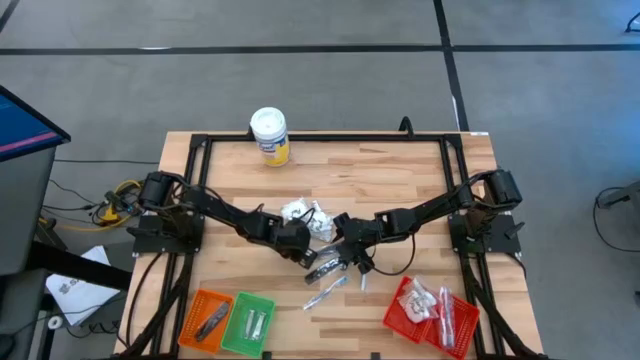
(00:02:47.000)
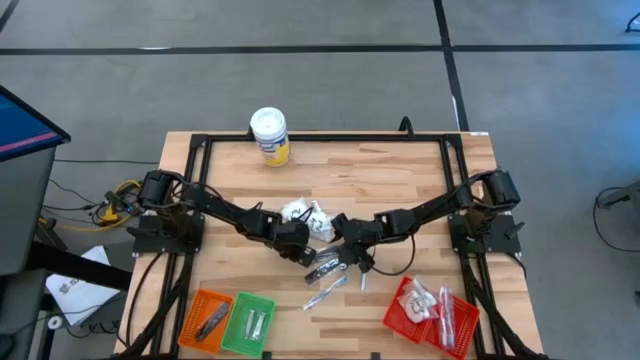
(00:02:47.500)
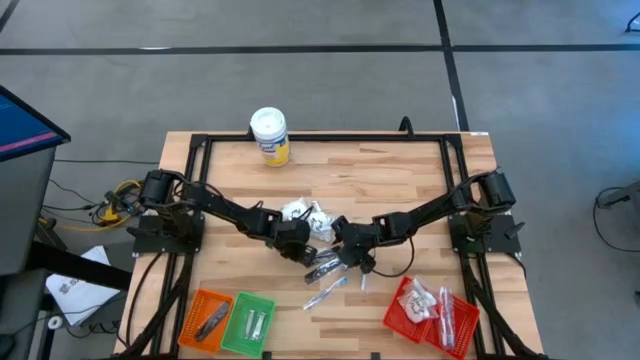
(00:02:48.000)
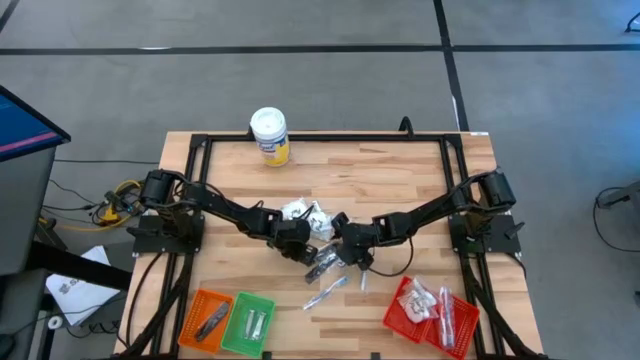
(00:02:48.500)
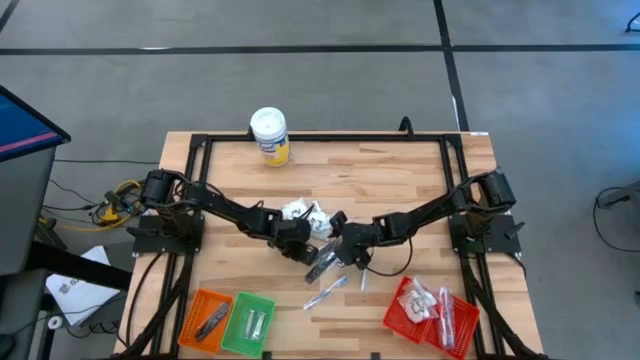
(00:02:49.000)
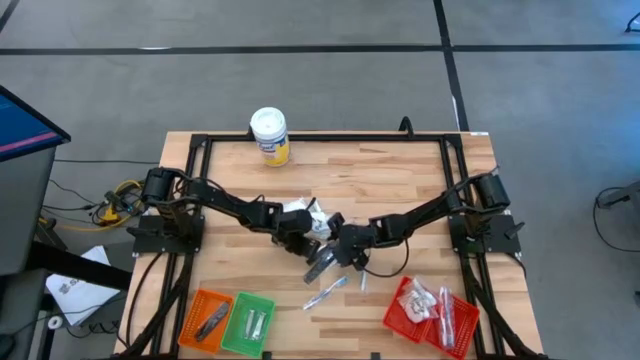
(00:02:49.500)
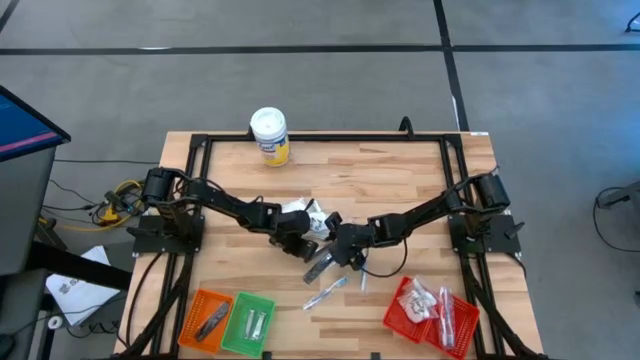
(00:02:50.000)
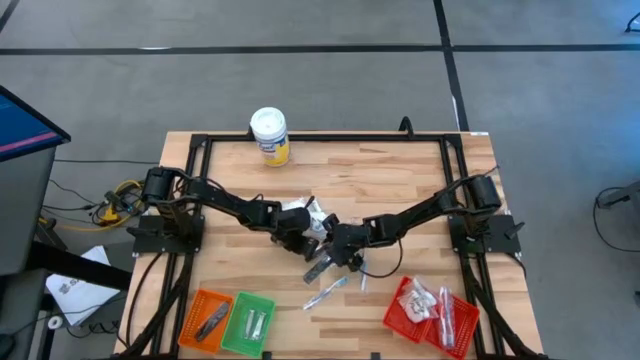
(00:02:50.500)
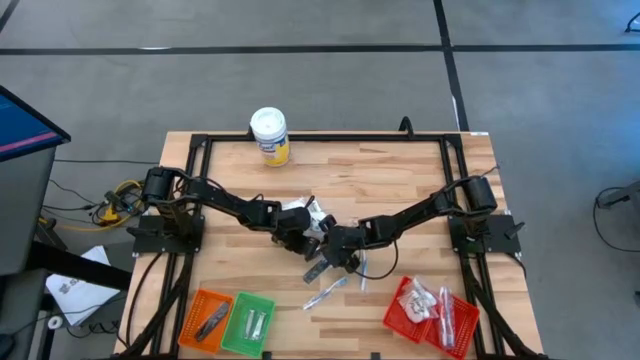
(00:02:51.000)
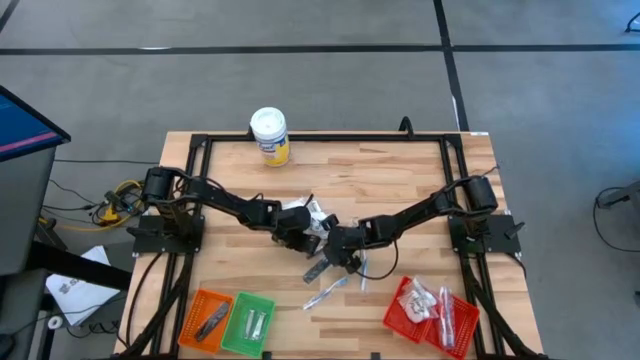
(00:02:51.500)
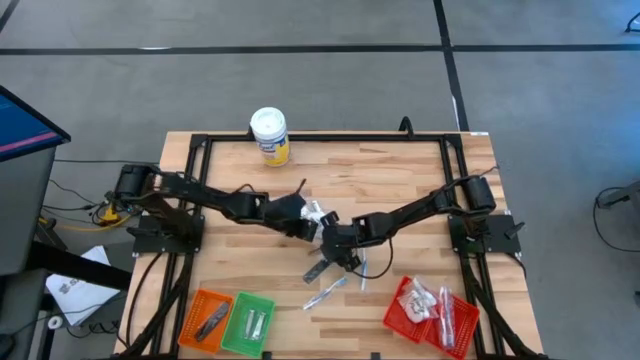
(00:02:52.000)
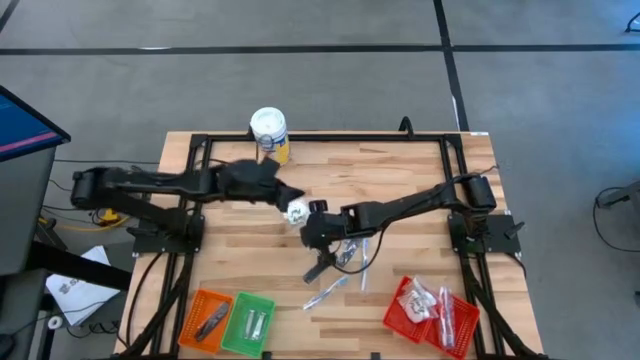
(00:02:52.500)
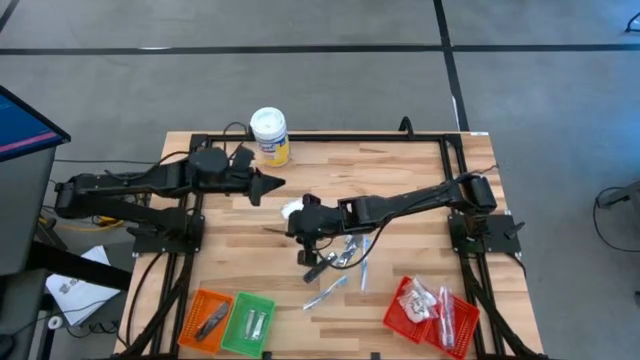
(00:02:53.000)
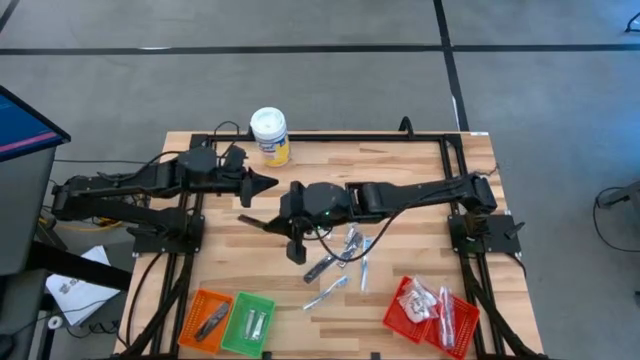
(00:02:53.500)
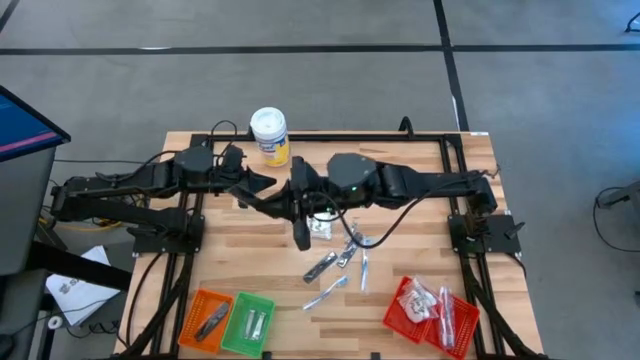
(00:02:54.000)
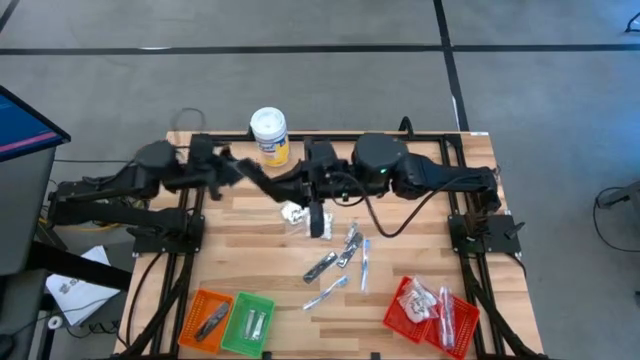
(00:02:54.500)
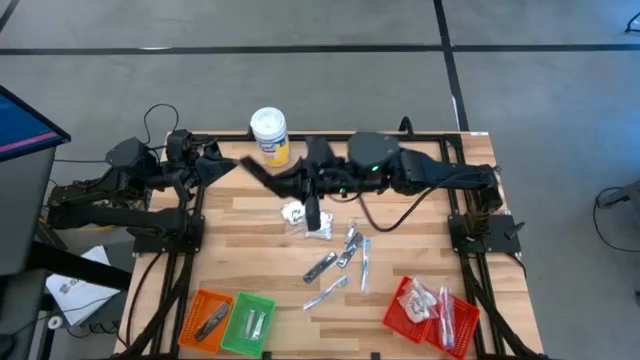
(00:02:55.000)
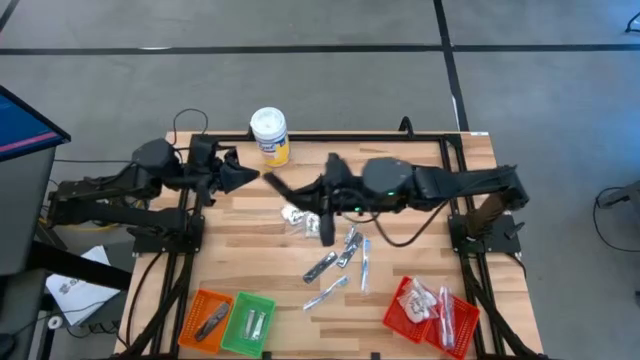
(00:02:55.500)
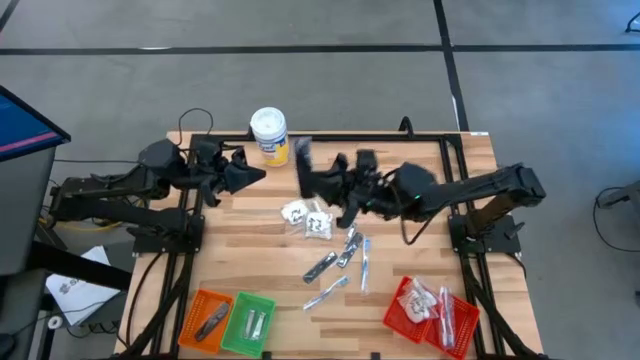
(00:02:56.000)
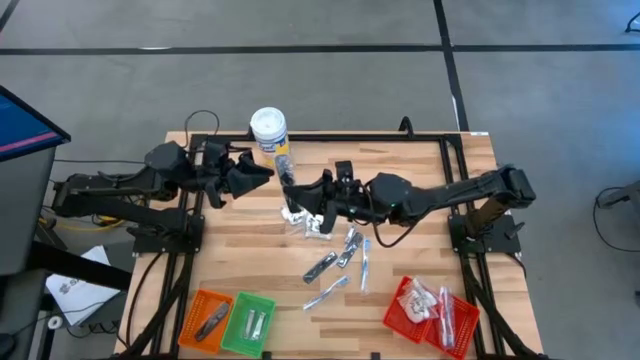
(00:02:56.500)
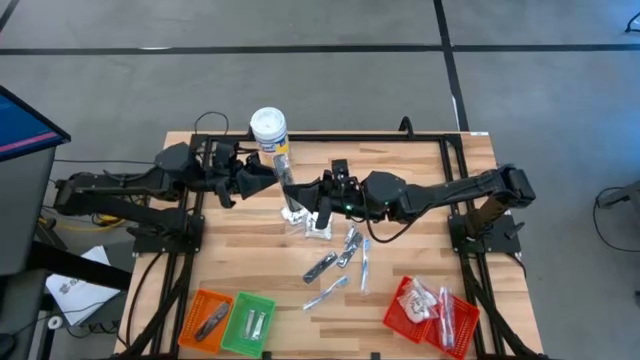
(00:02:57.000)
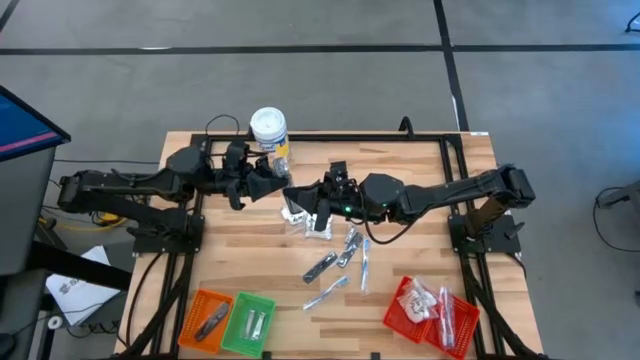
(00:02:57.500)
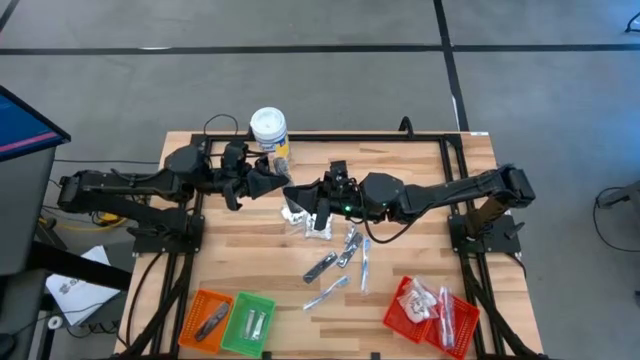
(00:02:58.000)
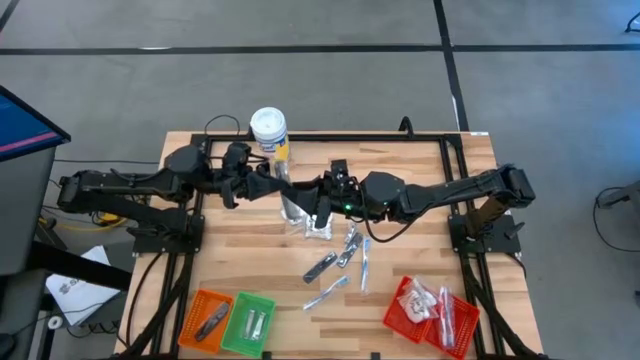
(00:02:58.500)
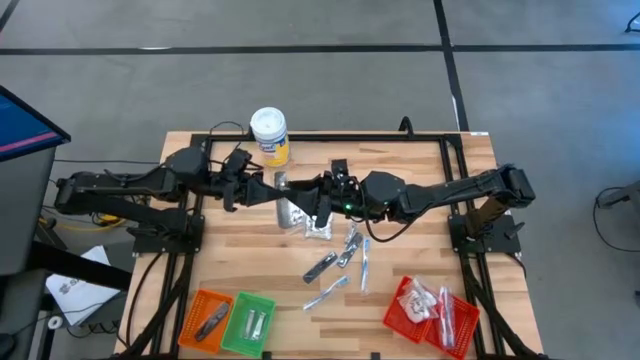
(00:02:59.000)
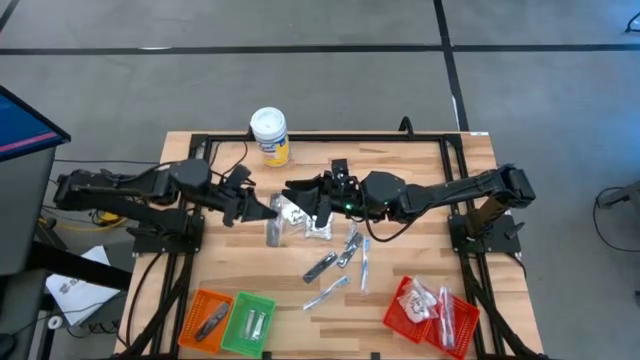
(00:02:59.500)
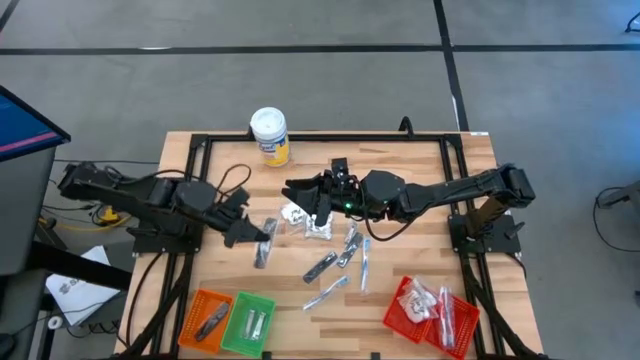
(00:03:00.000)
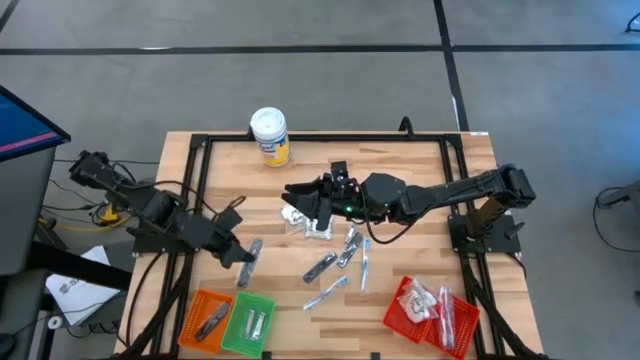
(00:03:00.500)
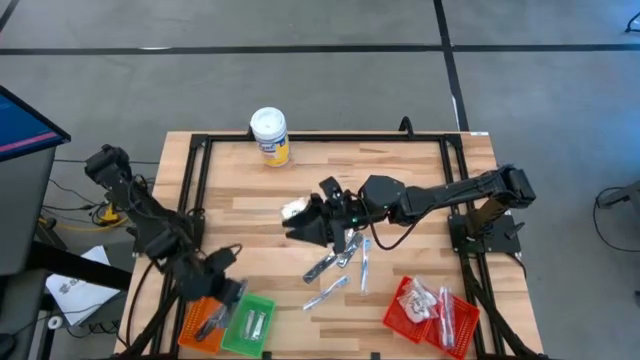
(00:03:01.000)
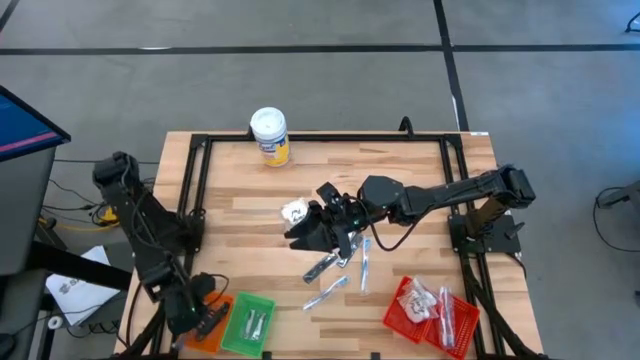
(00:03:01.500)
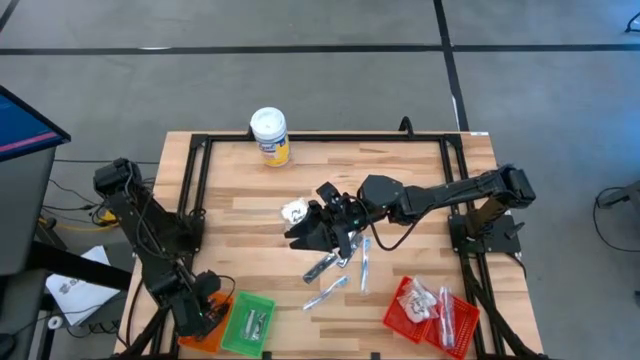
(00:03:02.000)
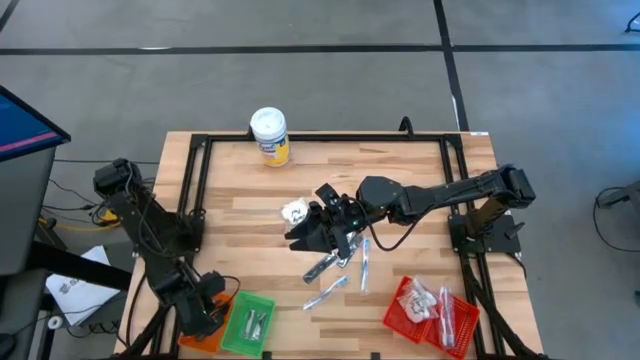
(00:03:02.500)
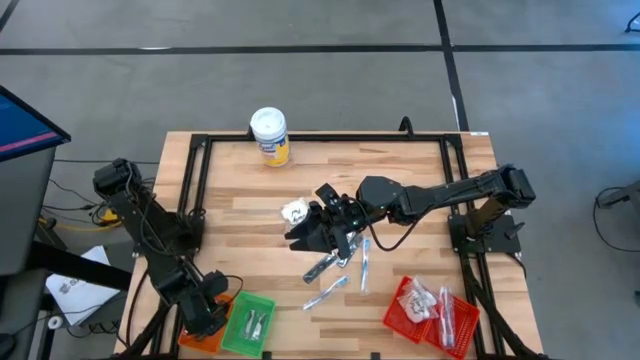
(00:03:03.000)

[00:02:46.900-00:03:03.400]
Task: Pick & Place Travel size toiletries
Put the black comb into the orange basket

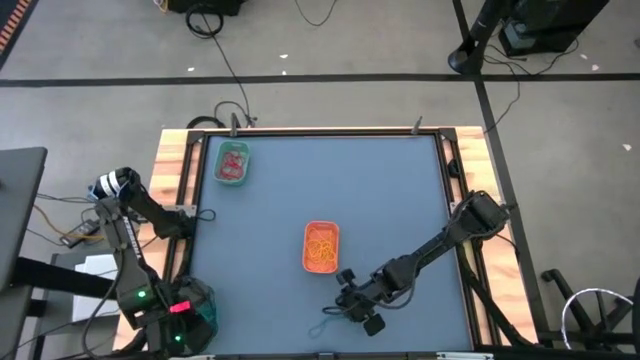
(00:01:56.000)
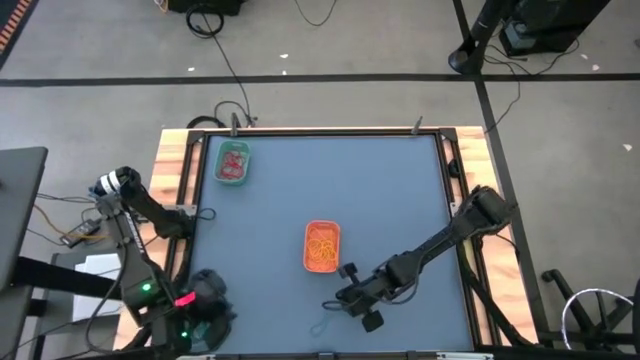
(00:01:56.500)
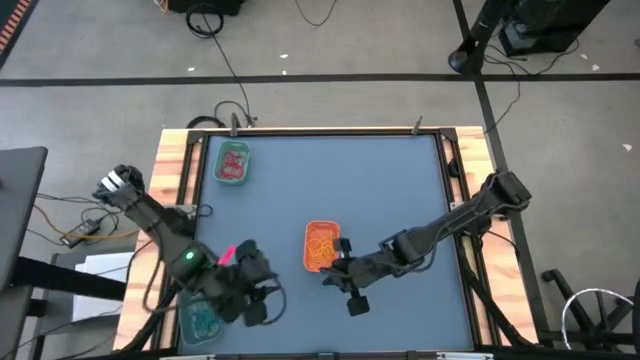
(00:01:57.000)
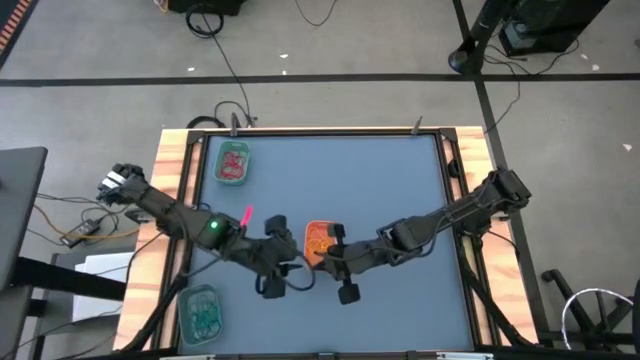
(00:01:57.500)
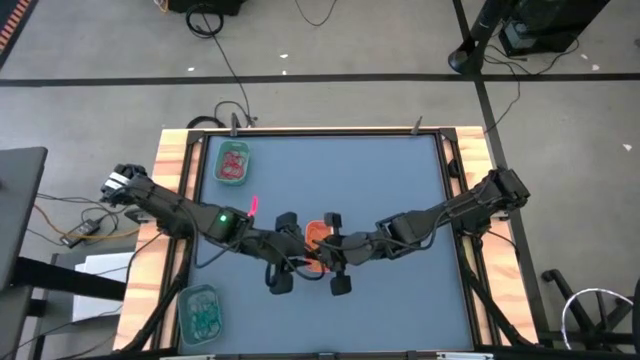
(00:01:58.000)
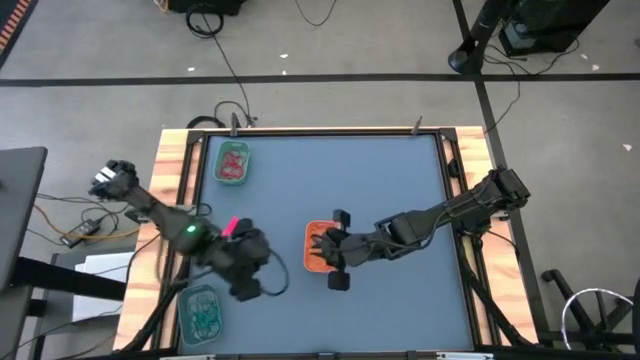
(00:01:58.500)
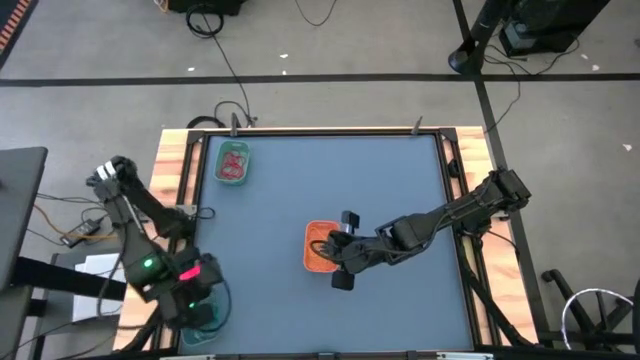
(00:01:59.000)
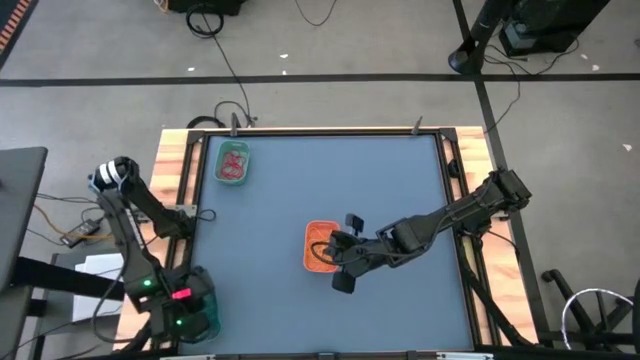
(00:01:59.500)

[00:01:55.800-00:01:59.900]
Task: Sort rubber bands into baskets
Put the blue rubber band into the blue bin
